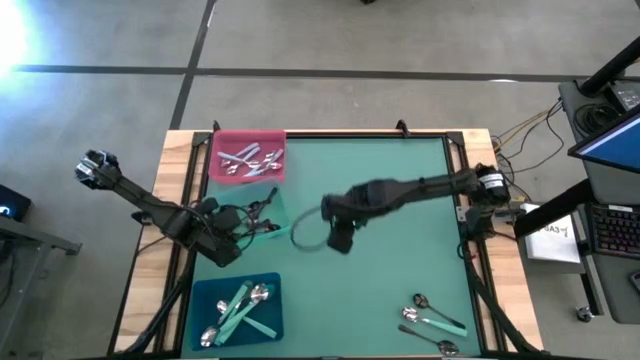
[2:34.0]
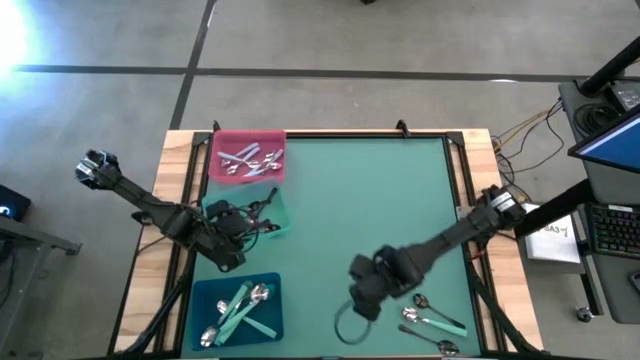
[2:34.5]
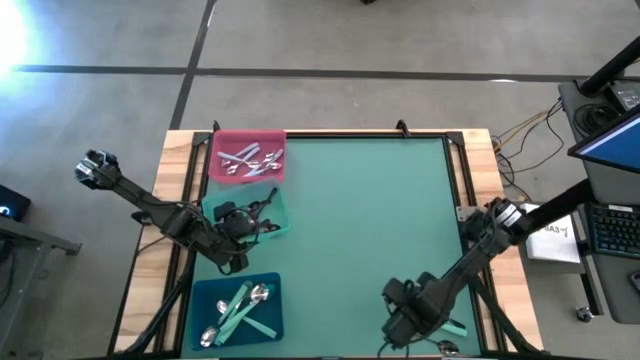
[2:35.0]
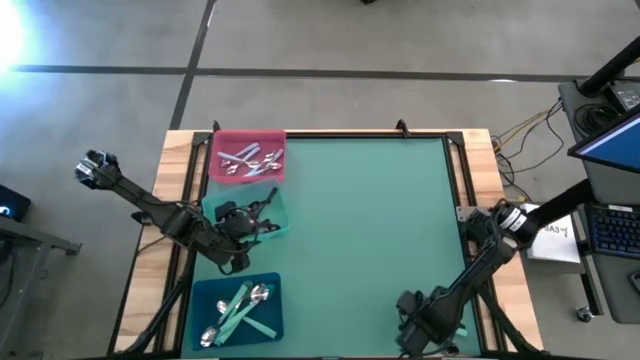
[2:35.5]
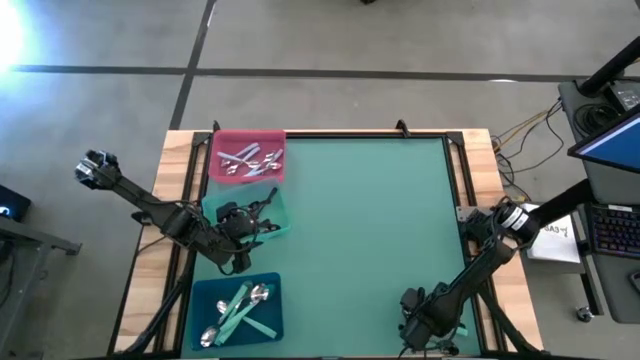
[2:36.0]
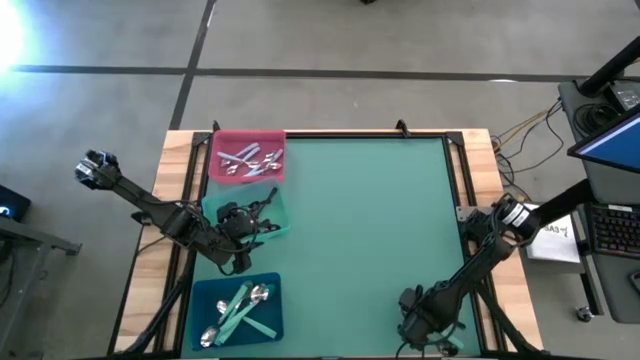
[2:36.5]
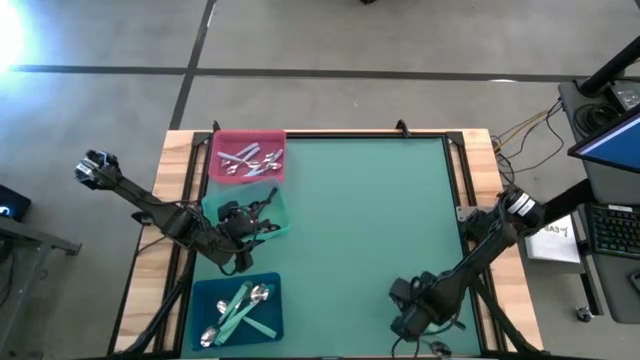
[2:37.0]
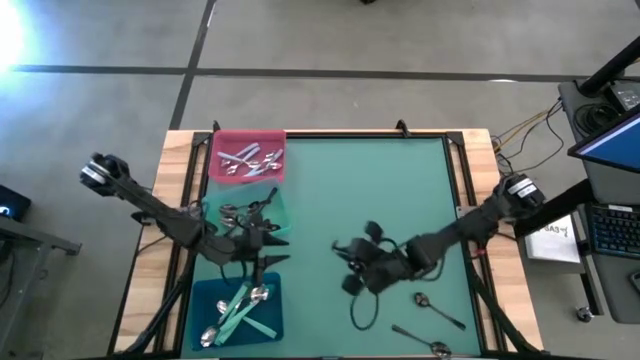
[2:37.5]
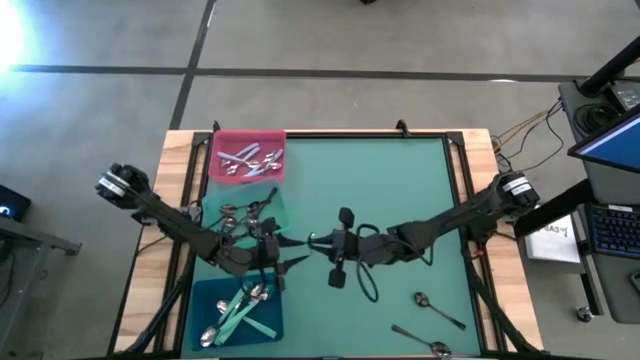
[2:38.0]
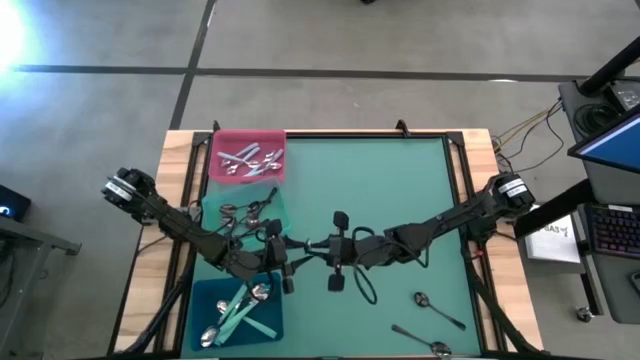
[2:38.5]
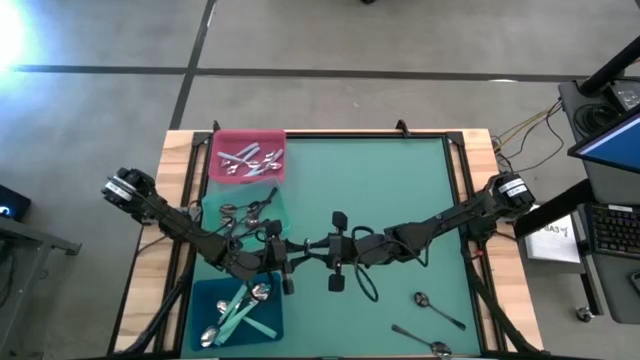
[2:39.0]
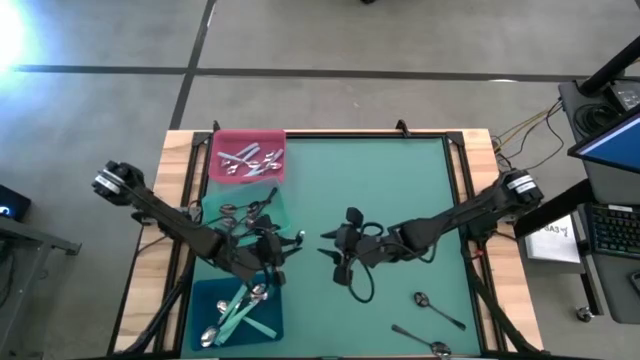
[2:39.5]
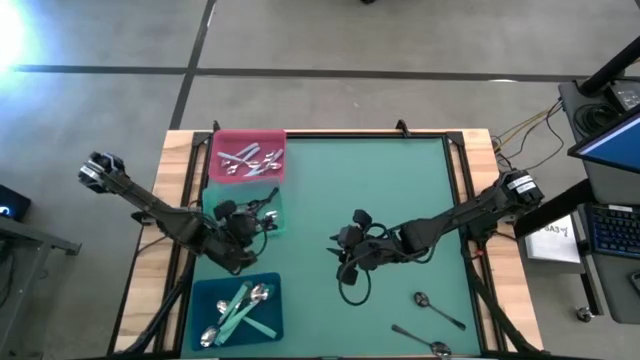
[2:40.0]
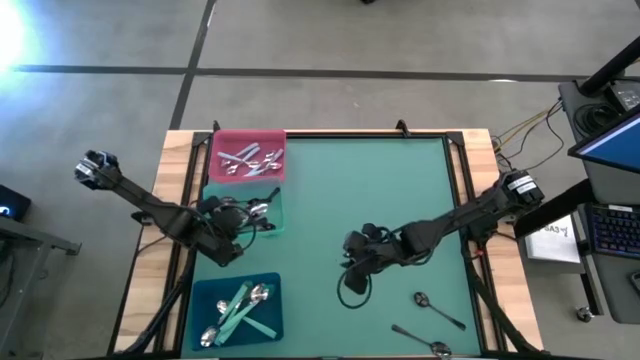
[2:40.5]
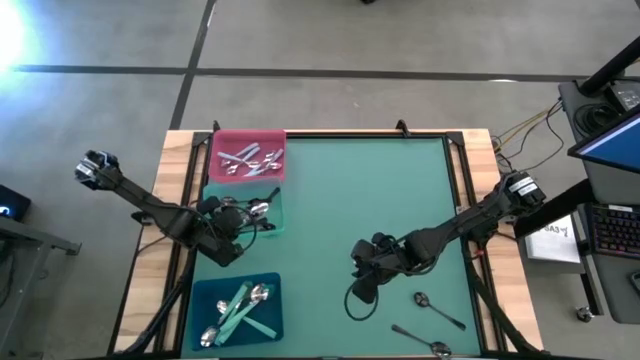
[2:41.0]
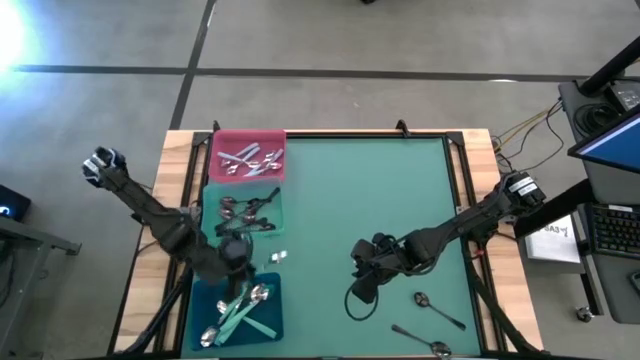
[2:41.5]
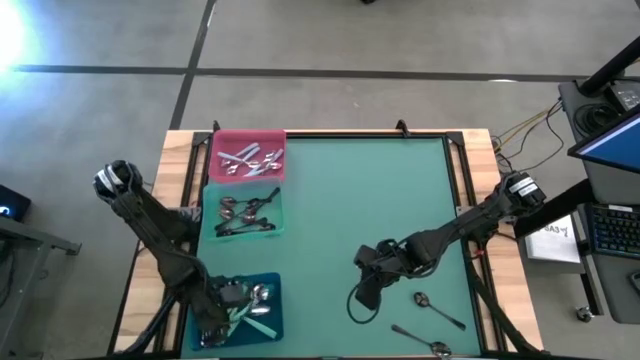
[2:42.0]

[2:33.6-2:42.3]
Task: Sort silverware by color (type)
Put the light blue spoon into the blue bin

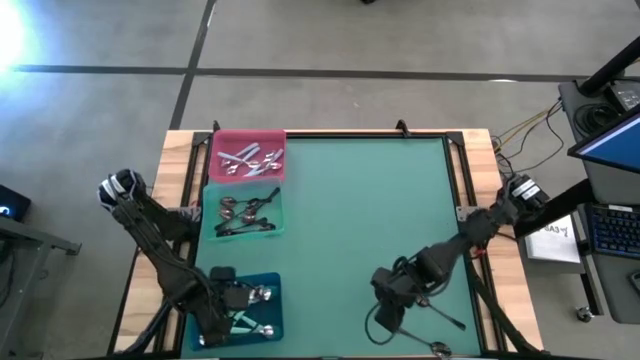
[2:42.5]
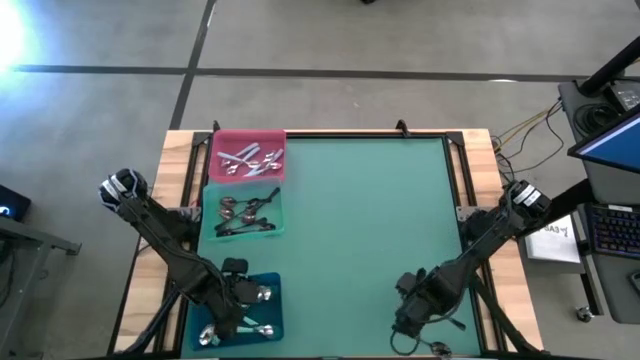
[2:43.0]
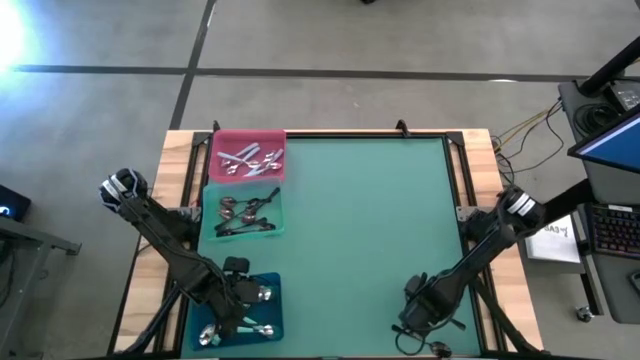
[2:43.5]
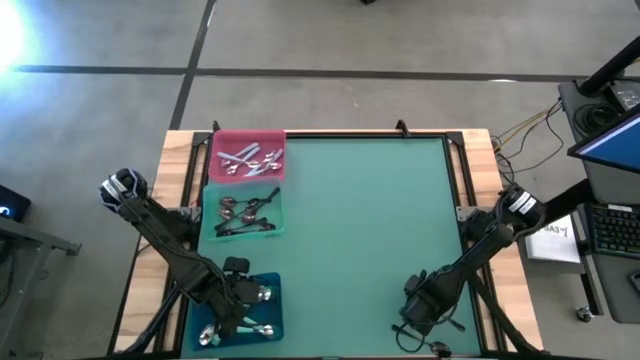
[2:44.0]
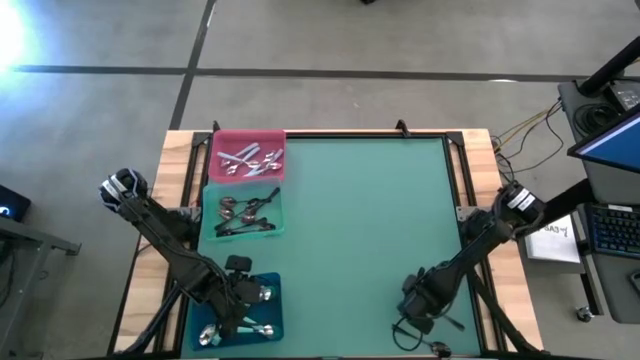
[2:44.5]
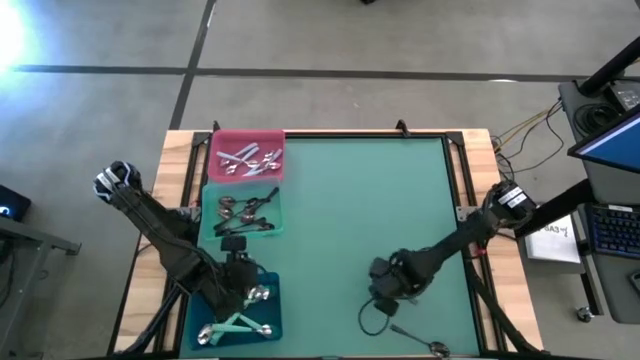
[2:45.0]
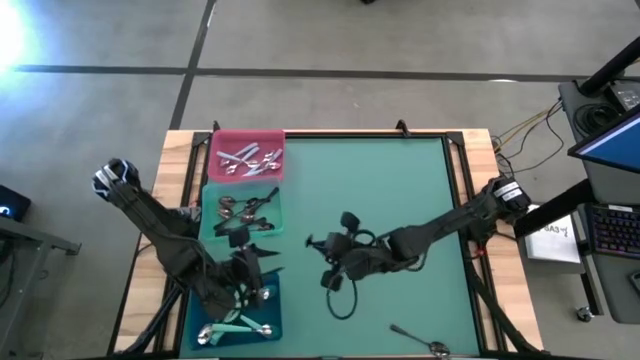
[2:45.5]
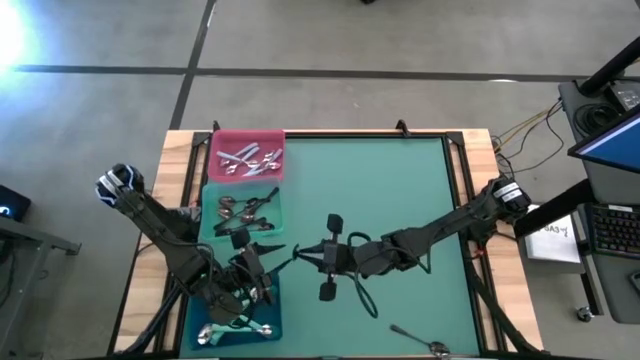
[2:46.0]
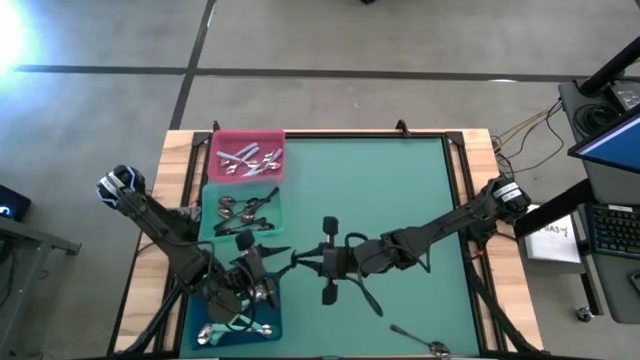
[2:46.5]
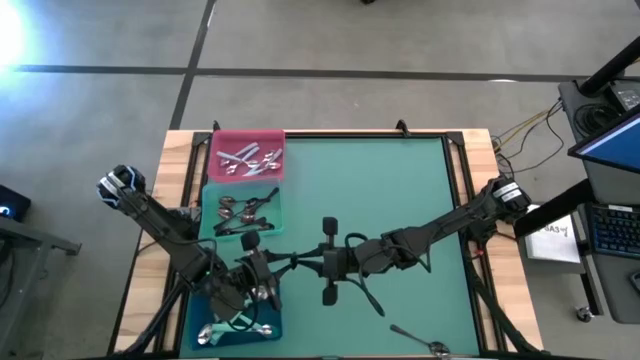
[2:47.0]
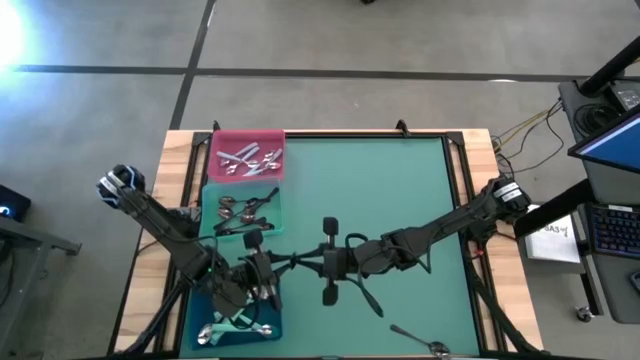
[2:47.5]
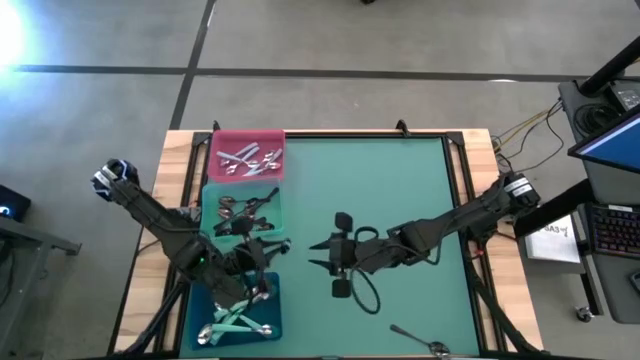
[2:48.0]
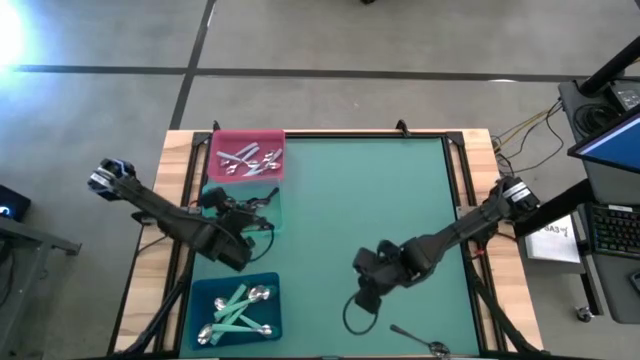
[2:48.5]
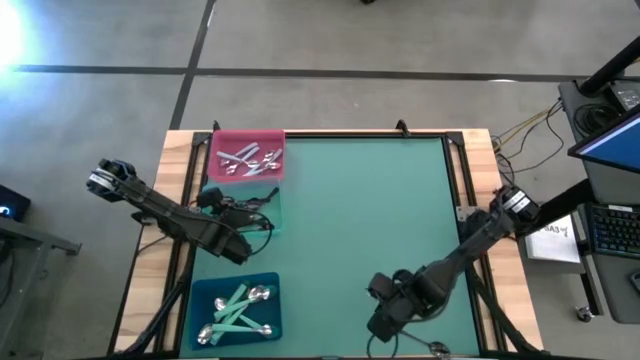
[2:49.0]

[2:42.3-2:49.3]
Put the black spoon into the green bin

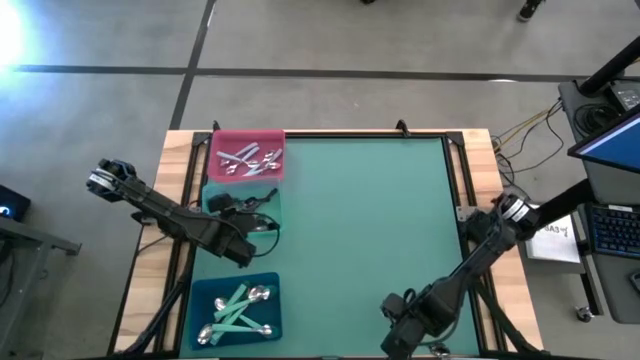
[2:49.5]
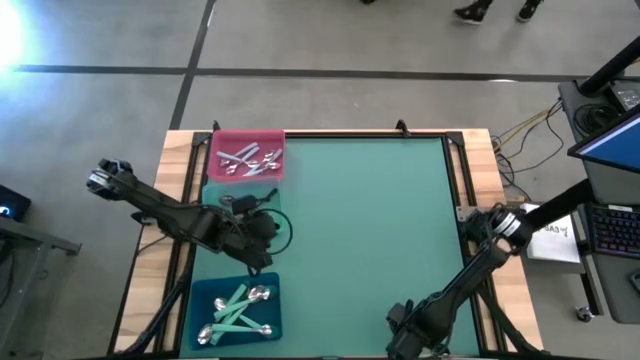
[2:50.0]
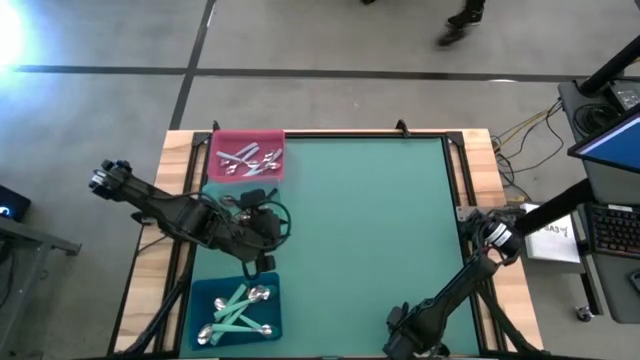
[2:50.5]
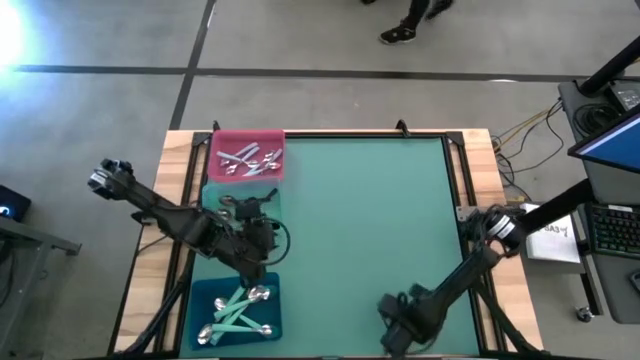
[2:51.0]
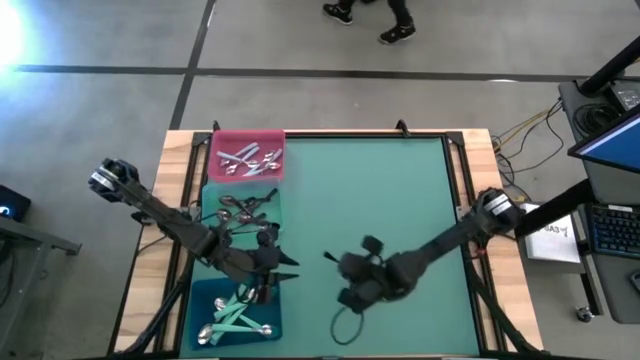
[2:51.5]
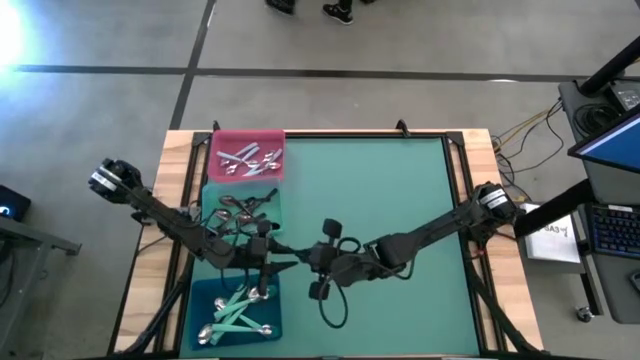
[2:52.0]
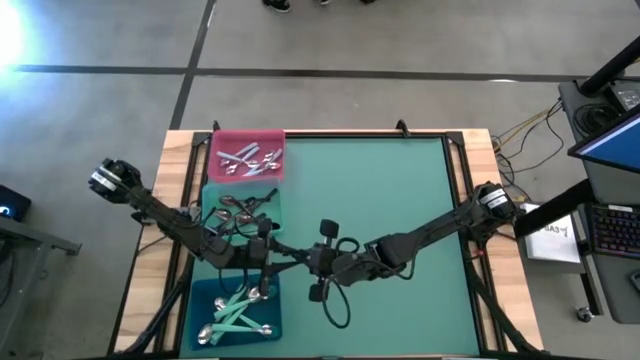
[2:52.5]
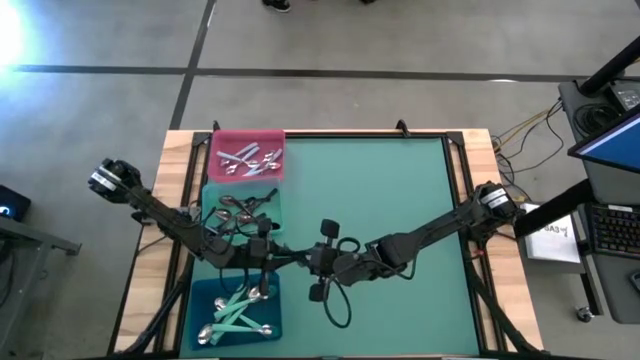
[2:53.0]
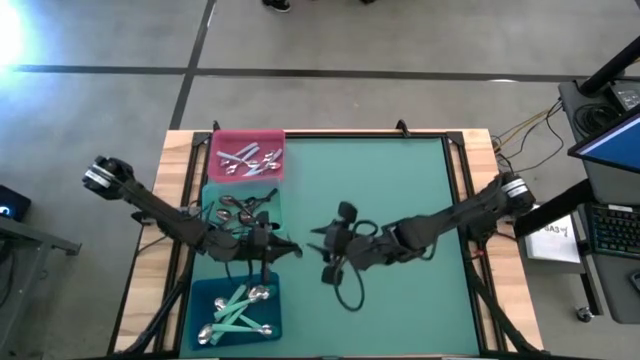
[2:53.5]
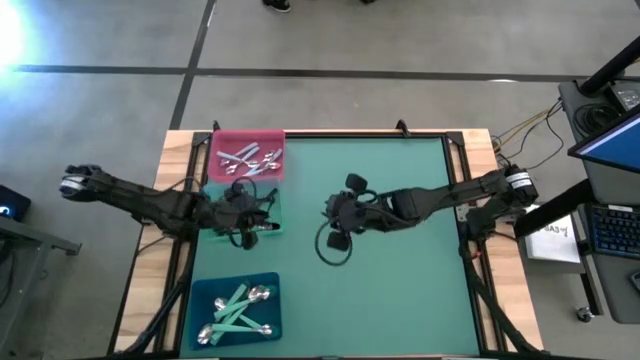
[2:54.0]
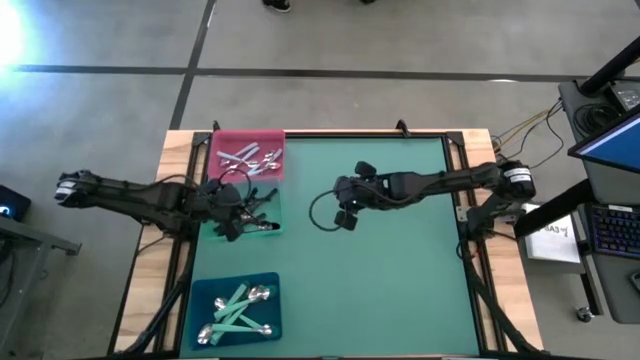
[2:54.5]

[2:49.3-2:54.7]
Put the black spoon into the green bin

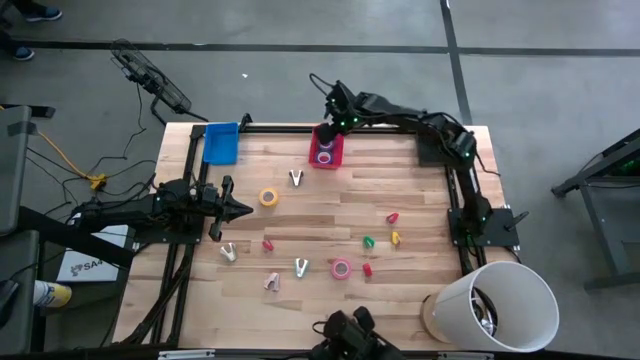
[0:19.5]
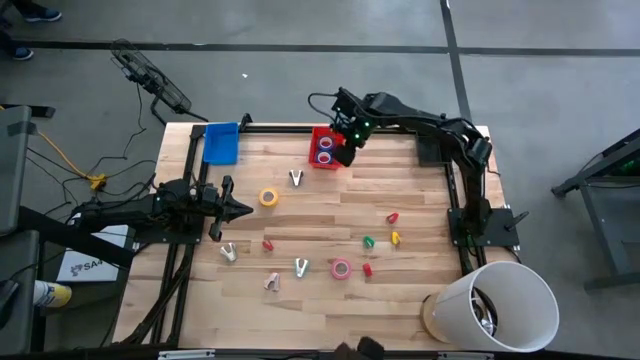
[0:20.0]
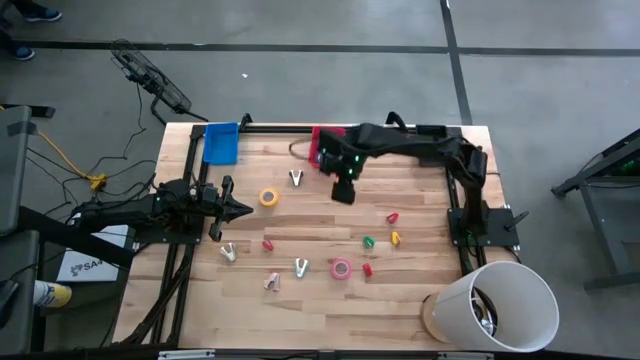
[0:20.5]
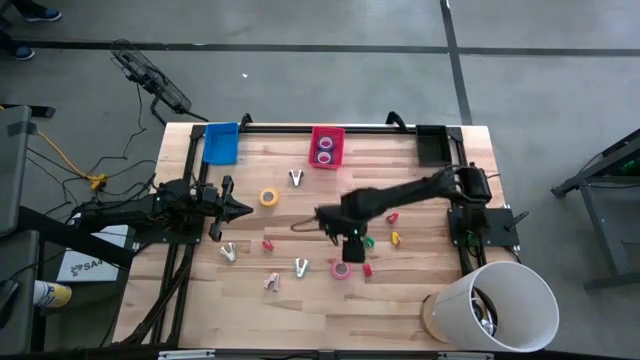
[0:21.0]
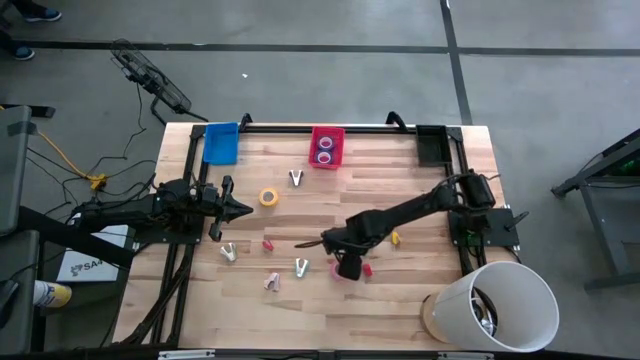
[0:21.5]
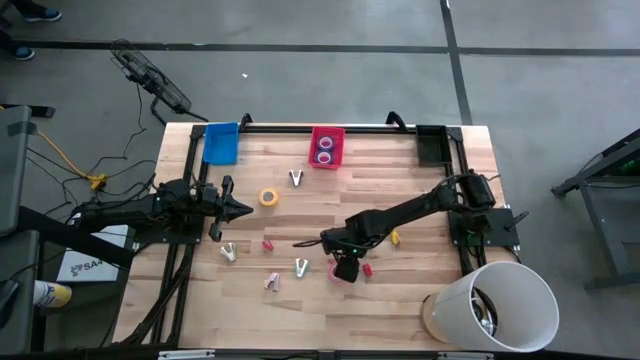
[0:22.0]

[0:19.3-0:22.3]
Task: Pick and place Stapler, Stapler remover, tape
Put the pink tape into the red bin
